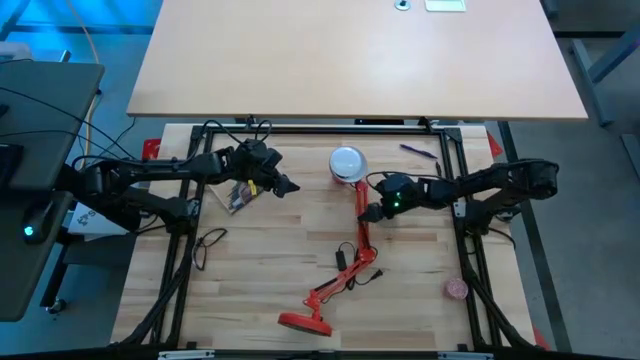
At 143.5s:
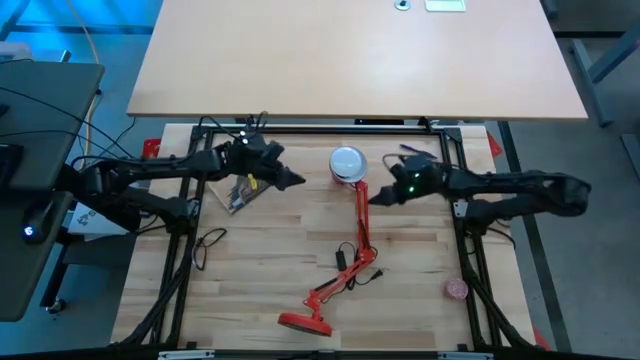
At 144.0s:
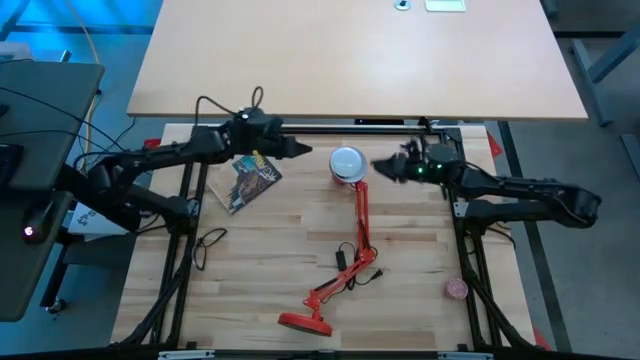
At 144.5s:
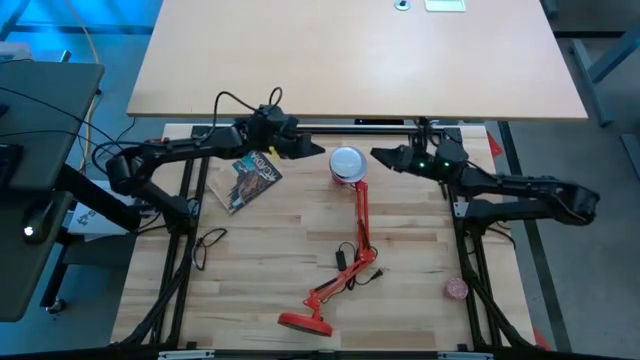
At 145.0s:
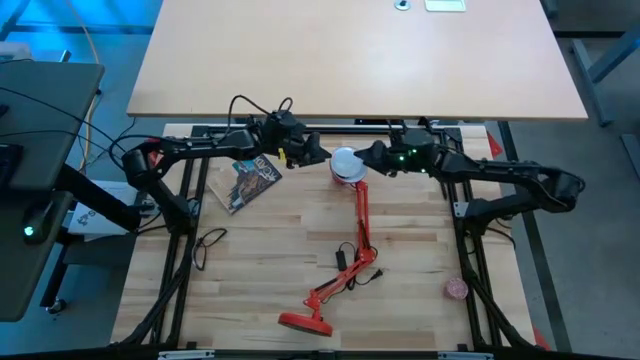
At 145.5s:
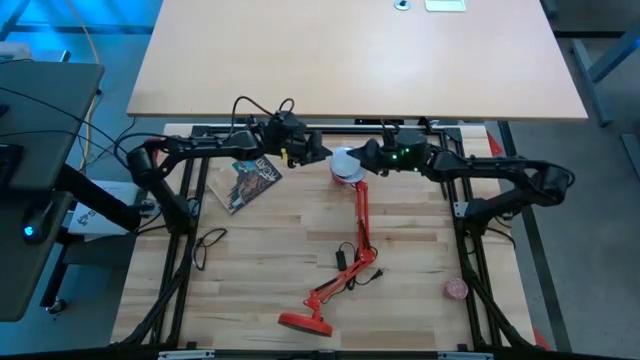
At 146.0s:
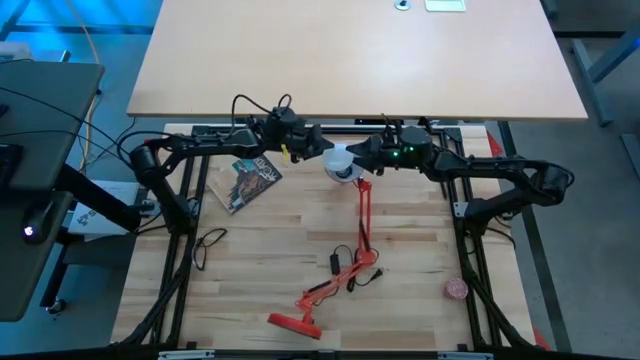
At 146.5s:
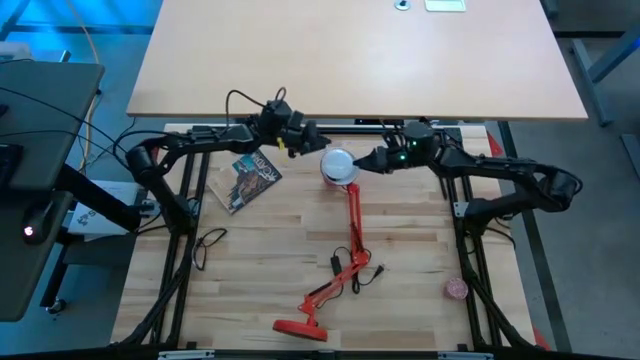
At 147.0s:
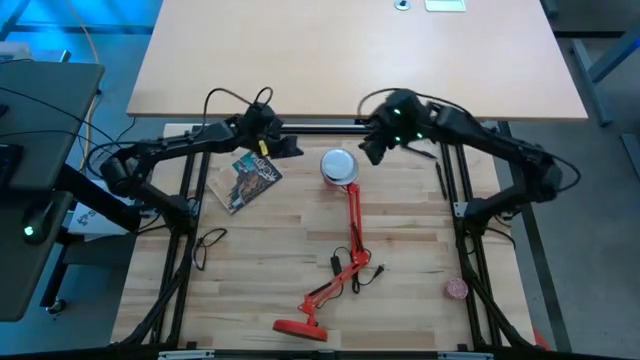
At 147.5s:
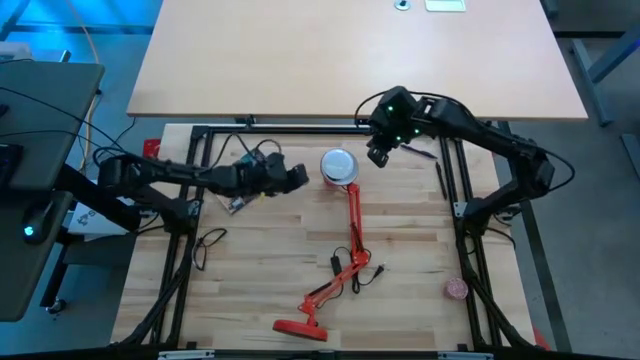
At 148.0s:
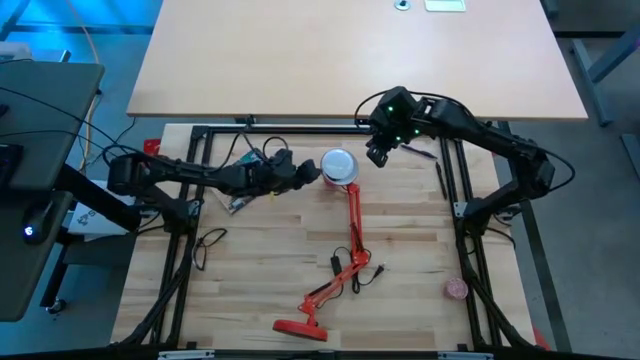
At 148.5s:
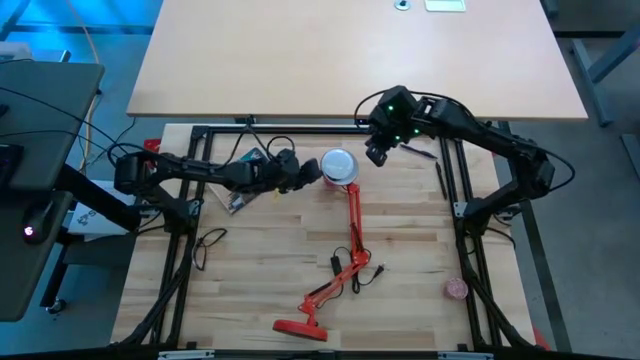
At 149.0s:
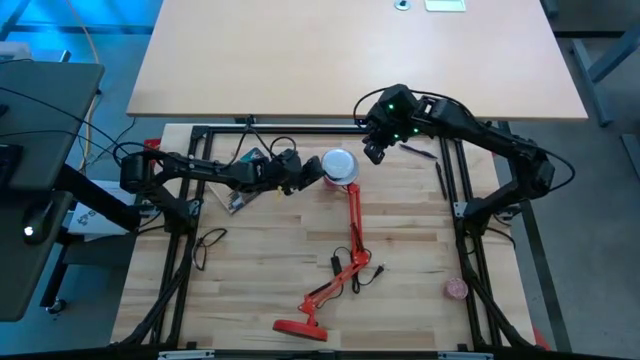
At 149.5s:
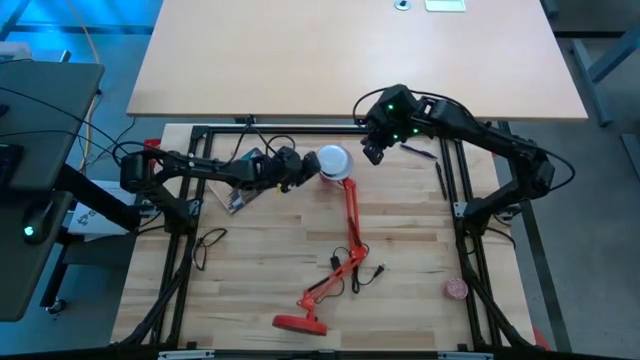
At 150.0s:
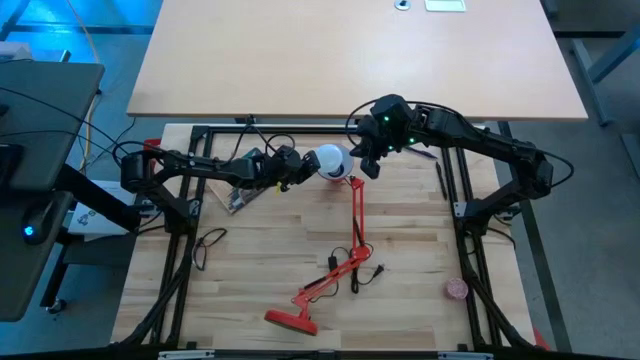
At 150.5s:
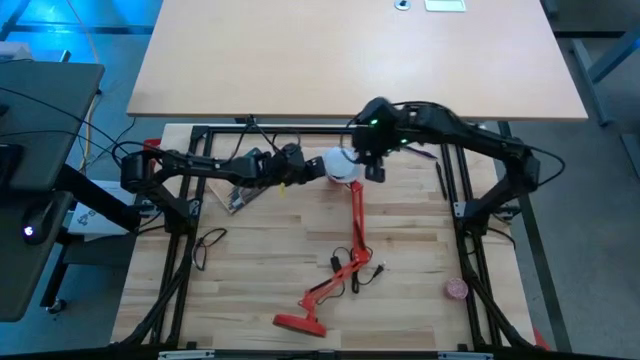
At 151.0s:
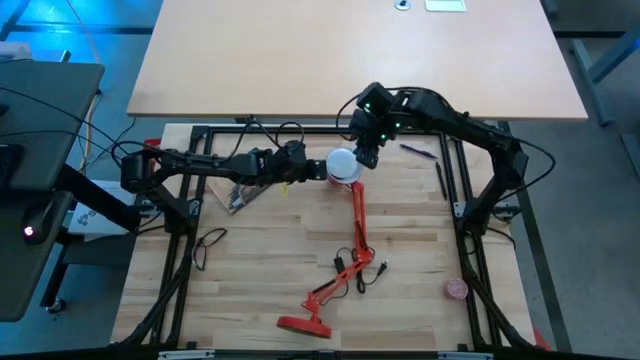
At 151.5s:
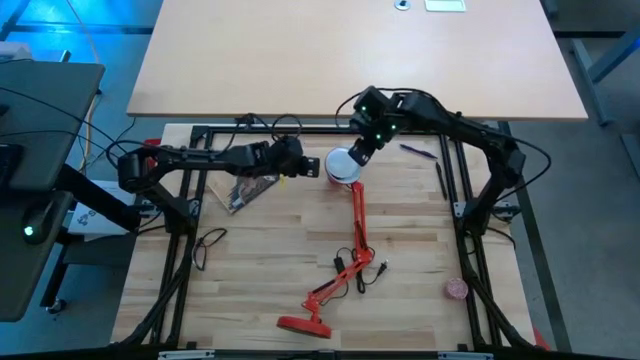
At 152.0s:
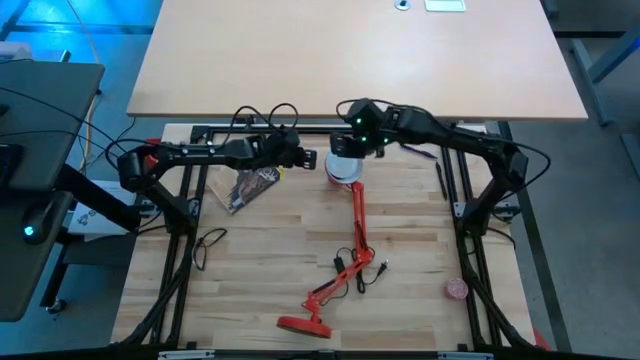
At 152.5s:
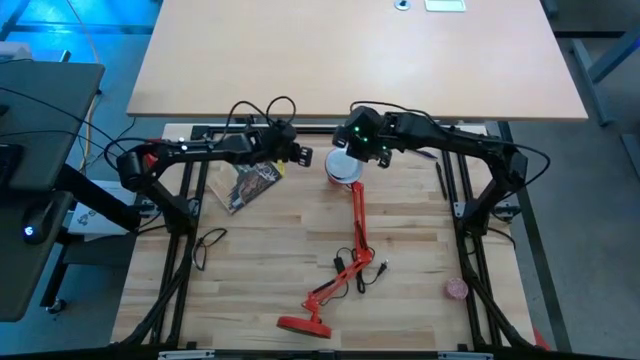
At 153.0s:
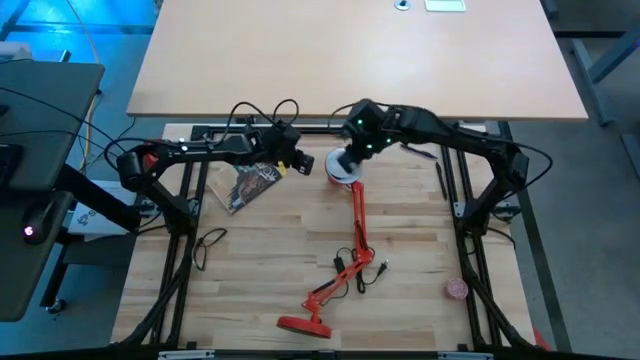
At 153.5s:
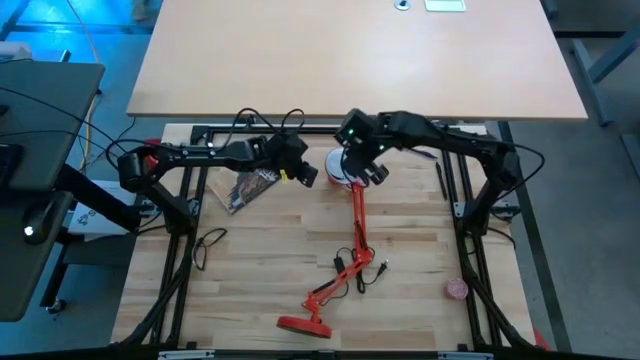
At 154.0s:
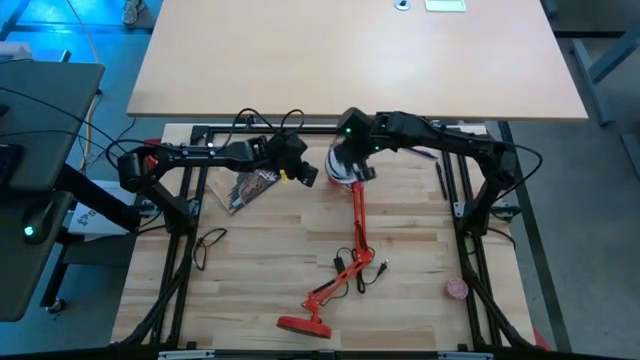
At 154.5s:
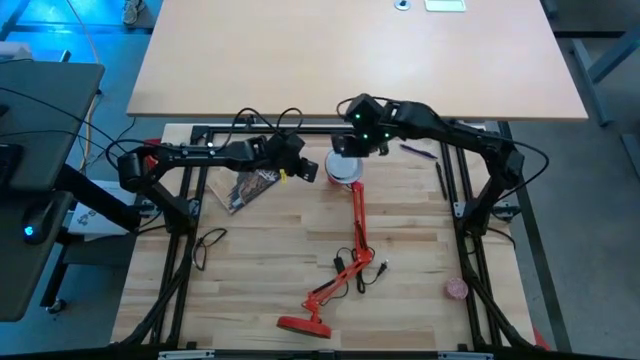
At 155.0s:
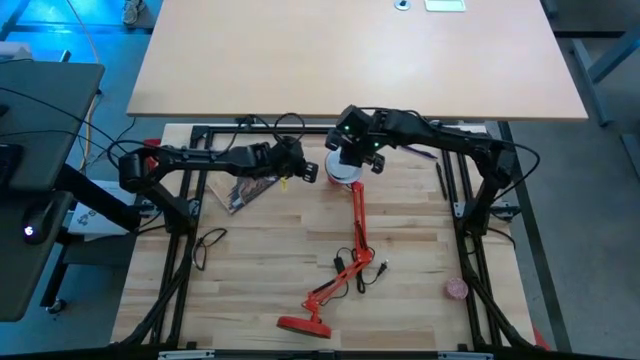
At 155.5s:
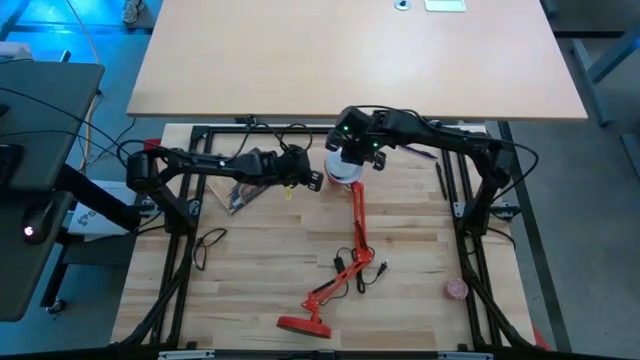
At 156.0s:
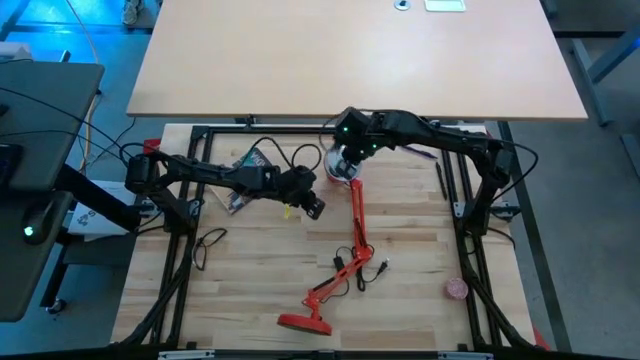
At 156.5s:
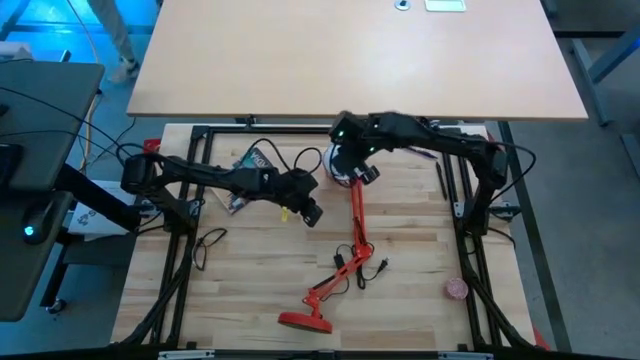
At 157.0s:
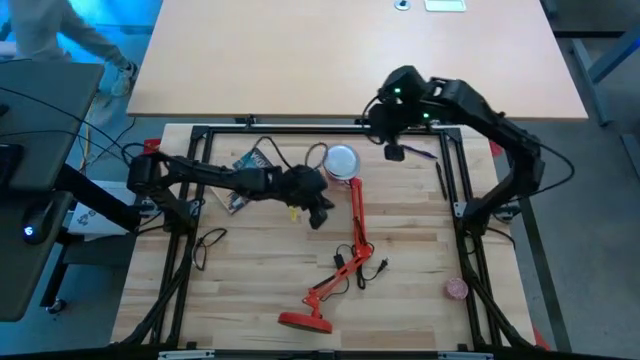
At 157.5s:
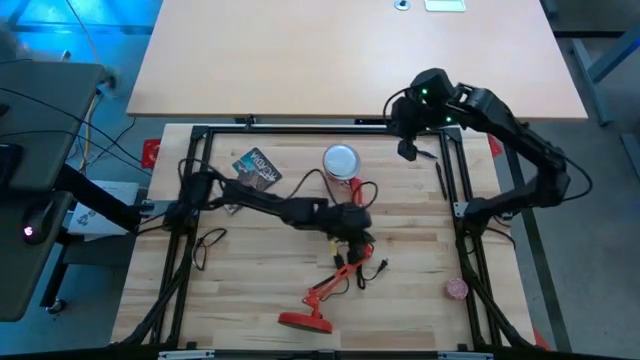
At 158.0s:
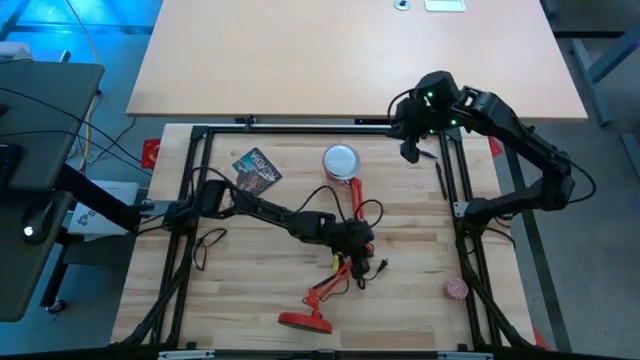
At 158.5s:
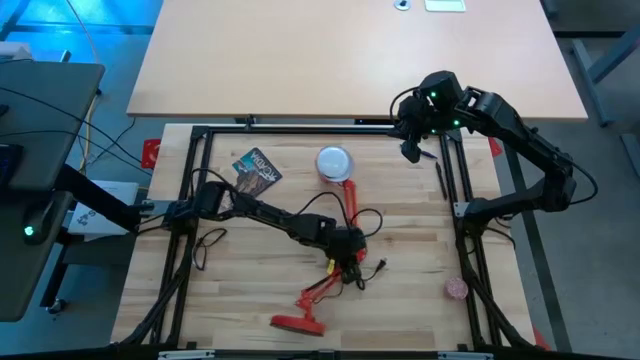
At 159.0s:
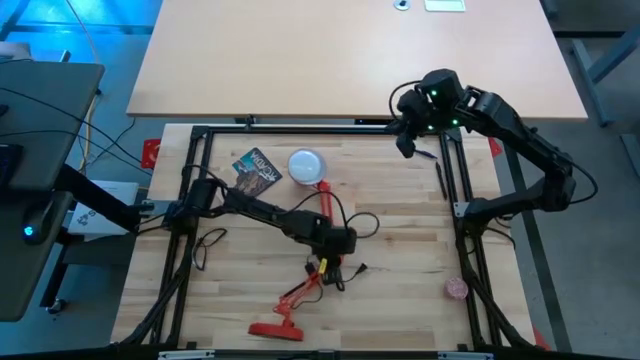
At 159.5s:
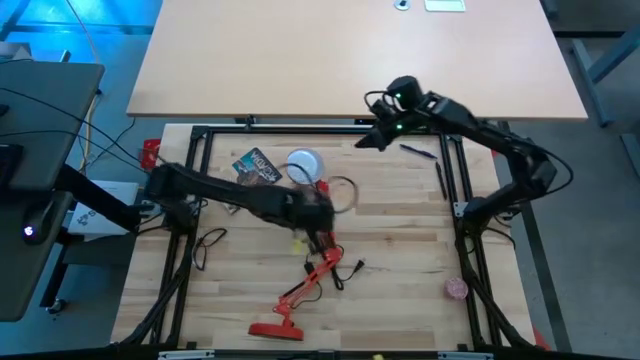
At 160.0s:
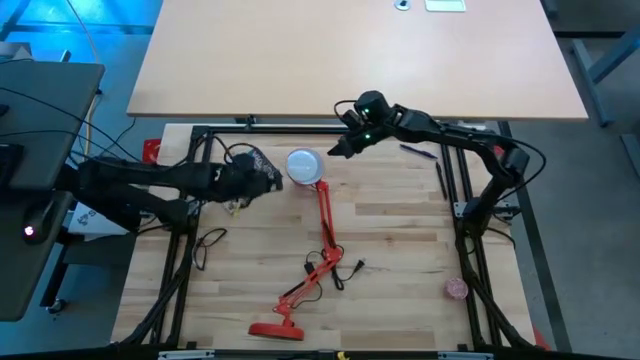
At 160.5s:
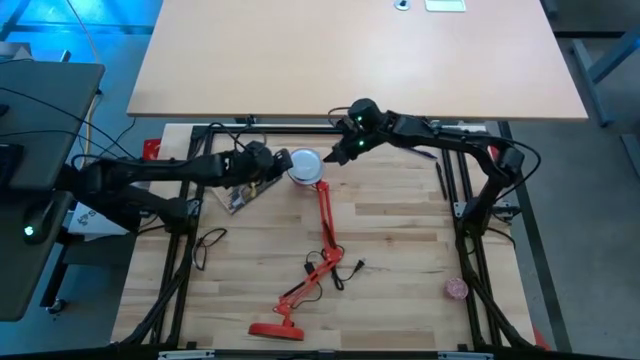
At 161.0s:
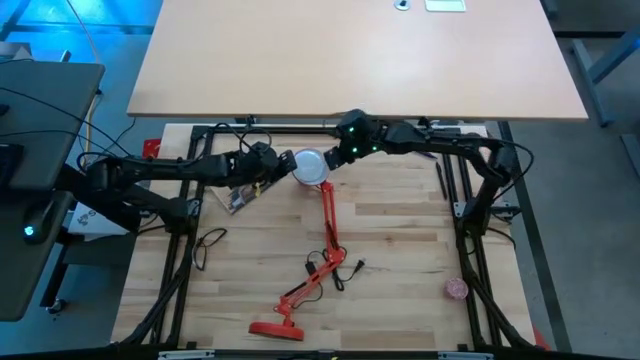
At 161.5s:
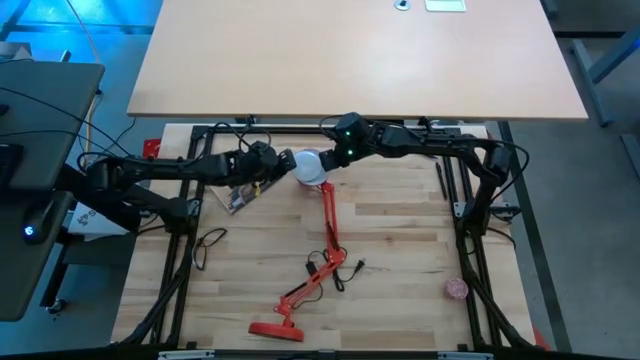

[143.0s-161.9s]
Task: Screw lightbulb
Remove the lightbulb from the red lamp

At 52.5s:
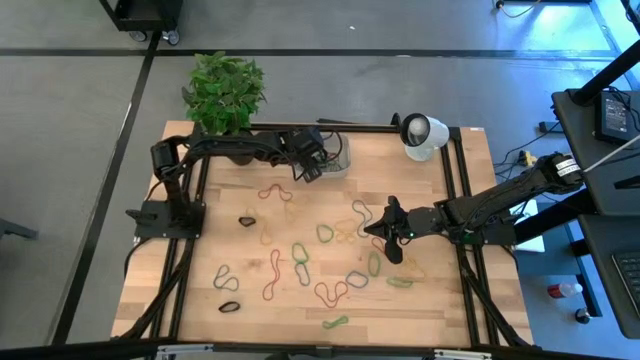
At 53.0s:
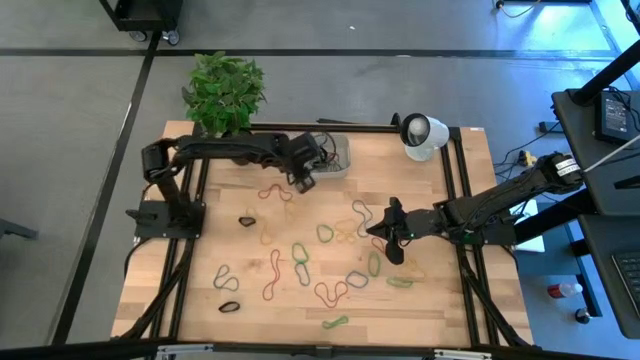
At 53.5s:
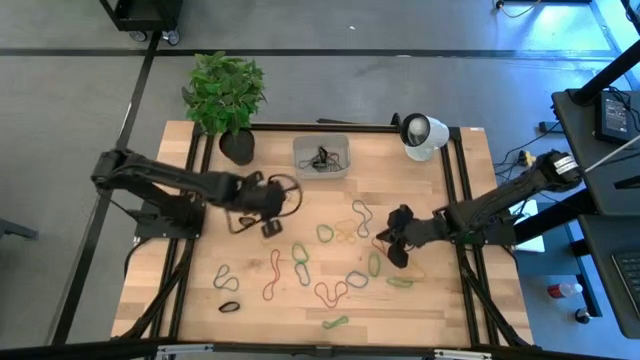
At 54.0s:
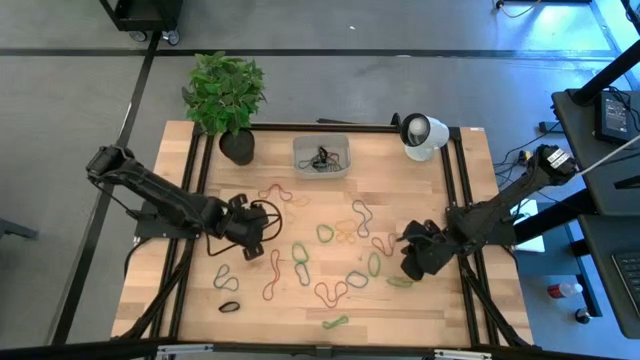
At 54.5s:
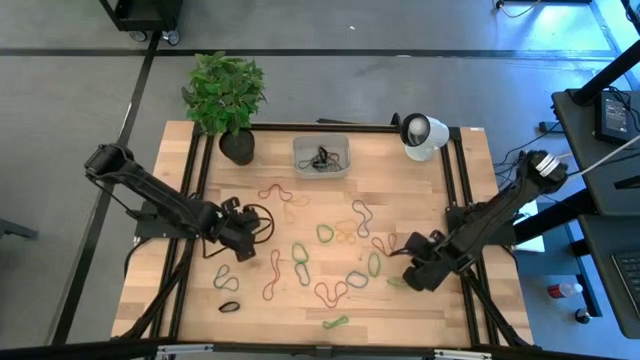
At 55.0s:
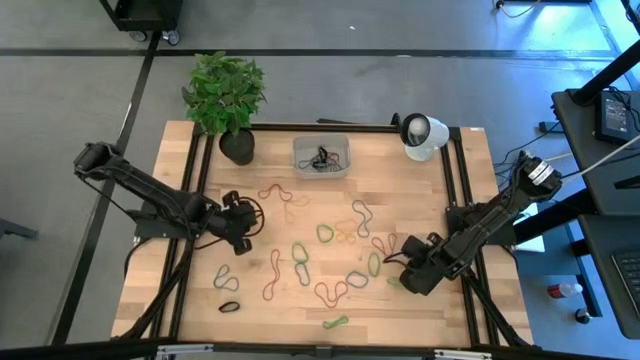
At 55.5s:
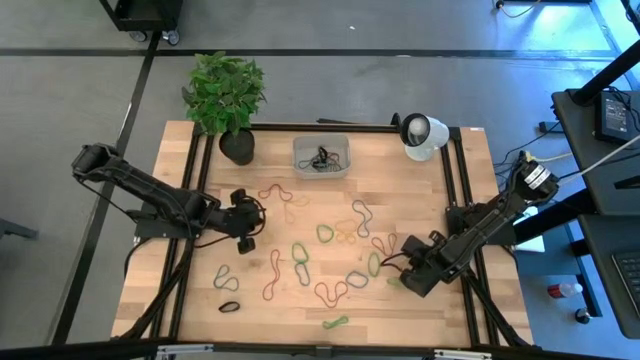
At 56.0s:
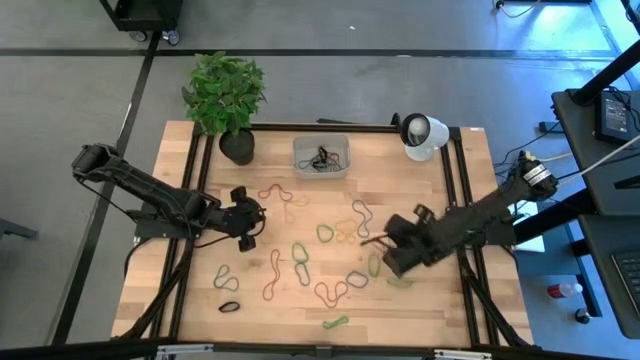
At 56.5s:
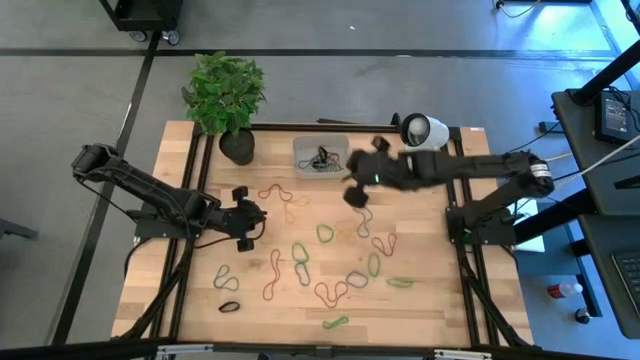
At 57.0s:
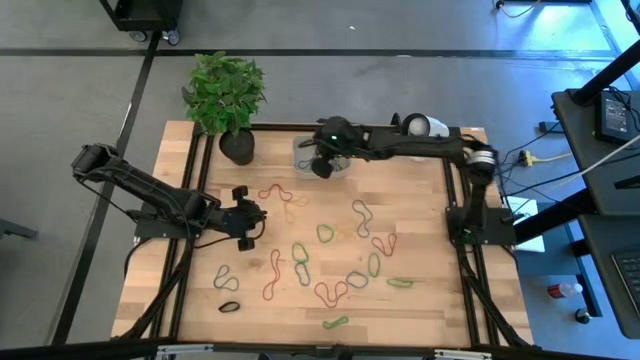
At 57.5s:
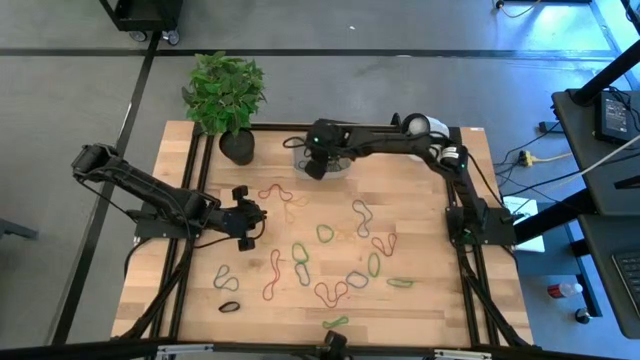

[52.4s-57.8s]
Task: Pick and place rubber bands into bin
Put the yellow rubber band into the gray bin
